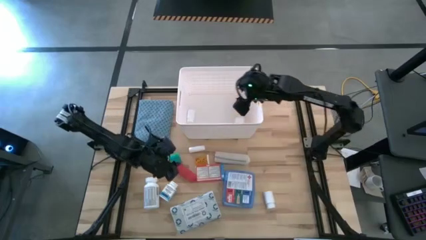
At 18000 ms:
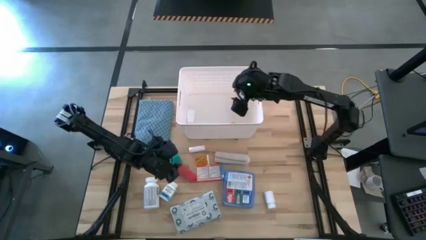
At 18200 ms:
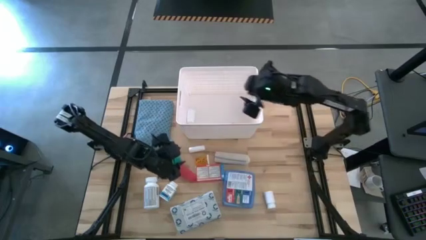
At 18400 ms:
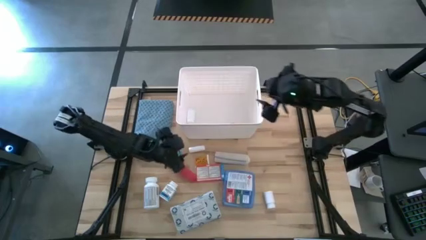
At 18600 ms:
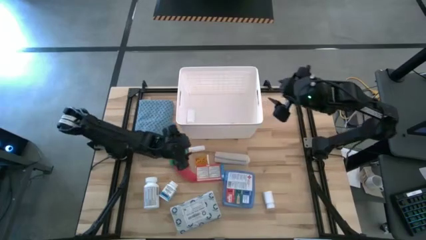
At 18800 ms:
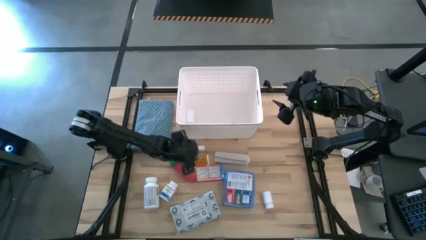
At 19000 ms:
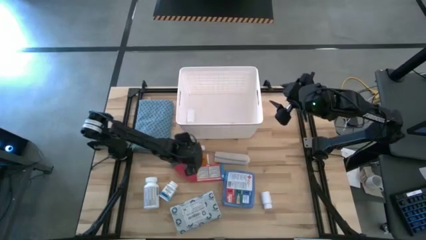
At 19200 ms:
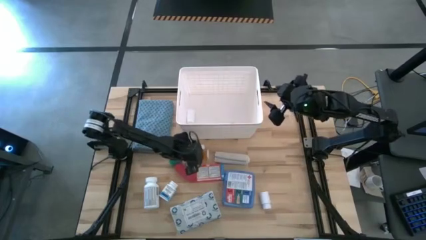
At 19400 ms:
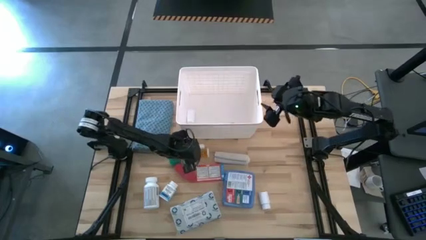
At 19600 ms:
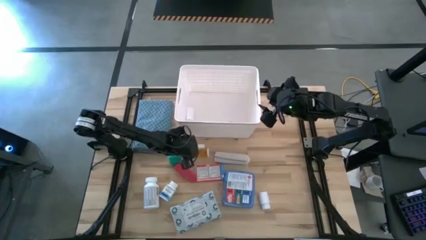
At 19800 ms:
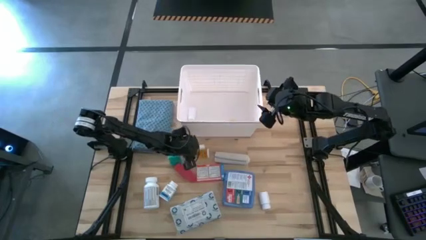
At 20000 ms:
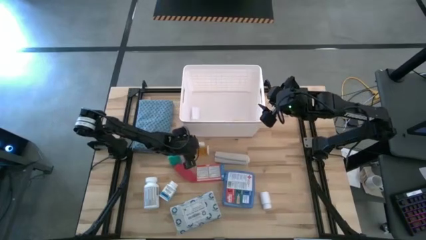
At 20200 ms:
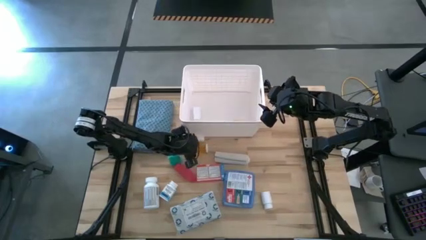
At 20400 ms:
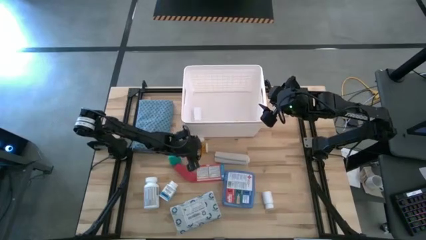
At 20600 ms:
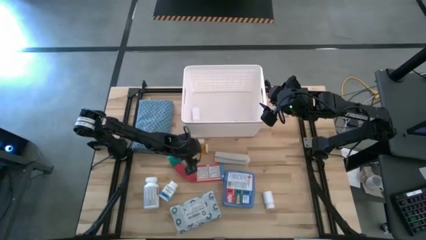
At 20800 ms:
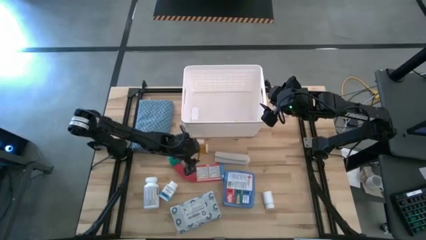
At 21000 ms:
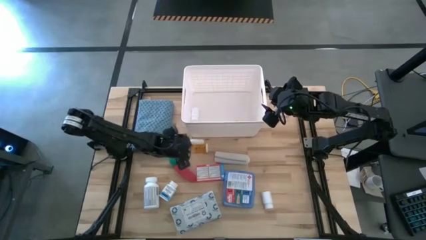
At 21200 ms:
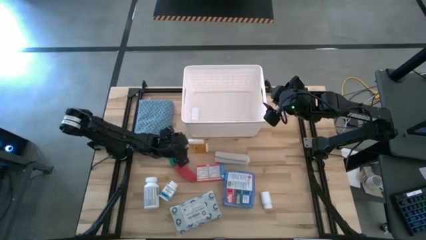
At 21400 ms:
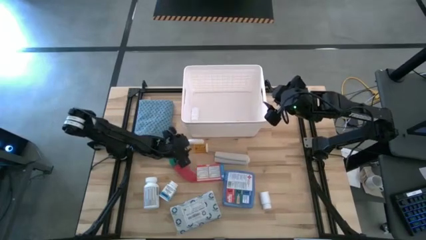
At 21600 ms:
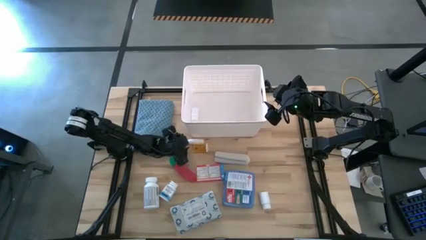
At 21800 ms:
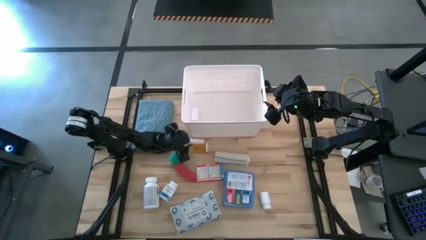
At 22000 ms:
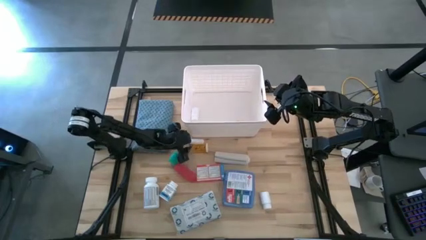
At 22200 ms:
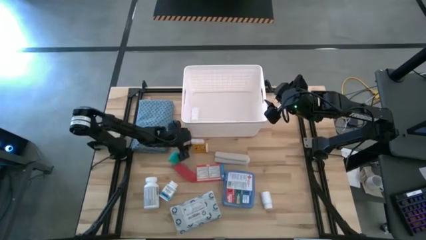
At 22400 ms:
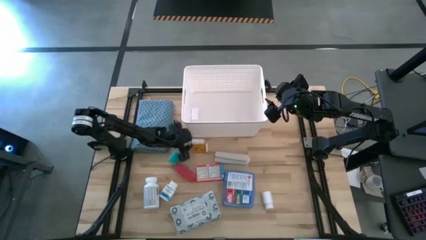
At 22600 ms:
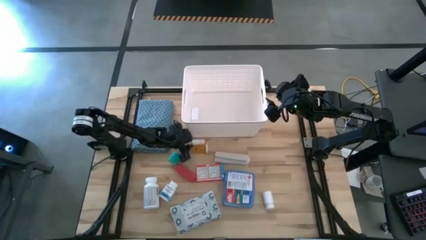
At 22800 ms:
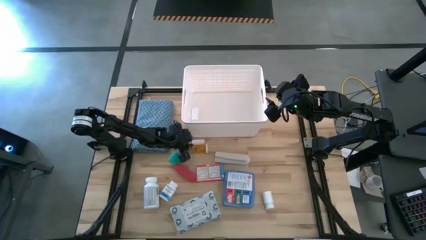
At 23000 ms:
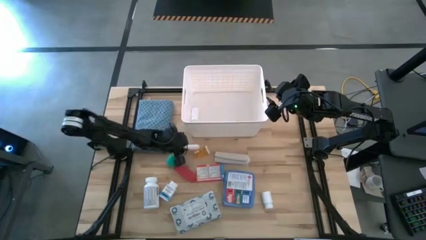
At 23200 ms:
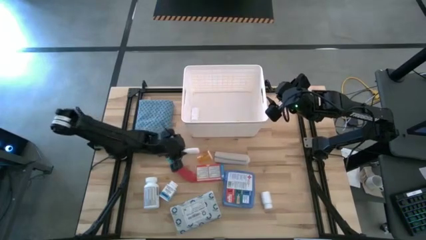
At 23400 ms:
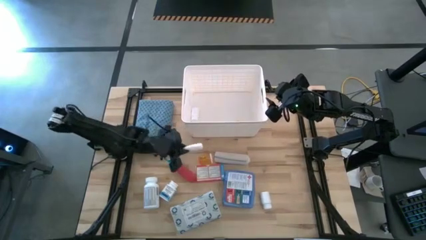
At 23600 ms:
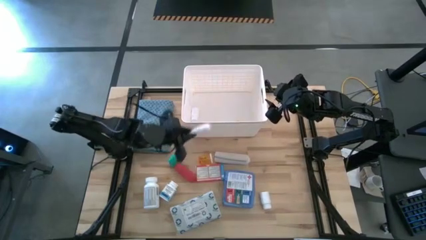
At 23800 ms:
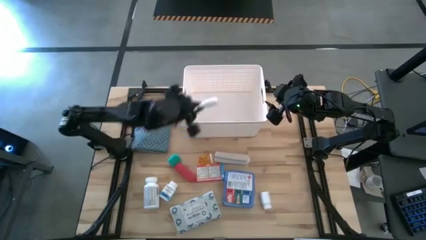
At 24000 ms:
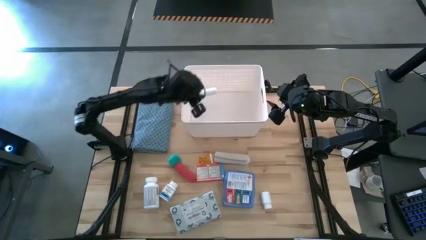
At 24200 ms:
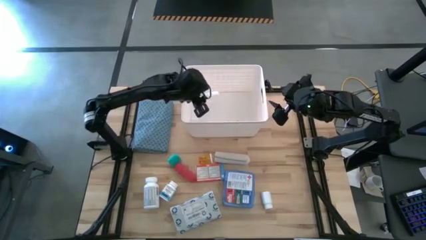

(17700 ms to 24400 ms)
Task: Pick & place medical supplies in basket/bin
Put the white rolled gauze into the white bin

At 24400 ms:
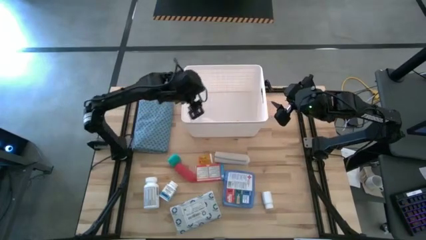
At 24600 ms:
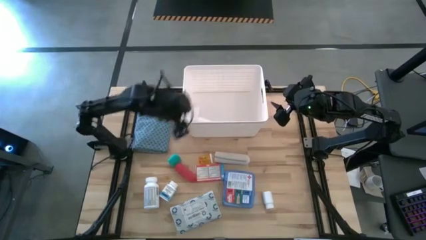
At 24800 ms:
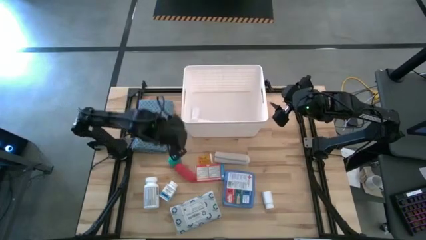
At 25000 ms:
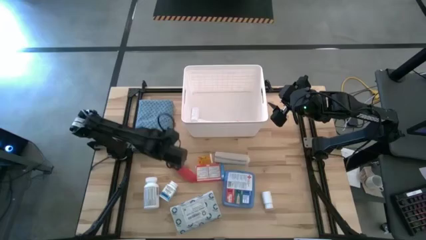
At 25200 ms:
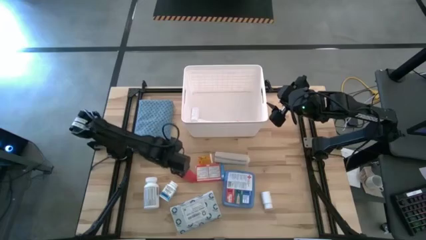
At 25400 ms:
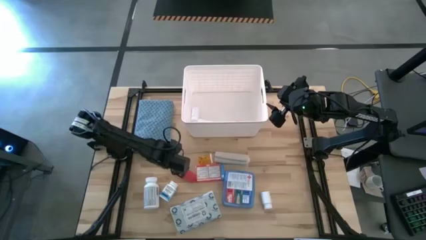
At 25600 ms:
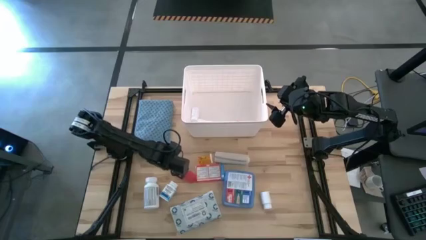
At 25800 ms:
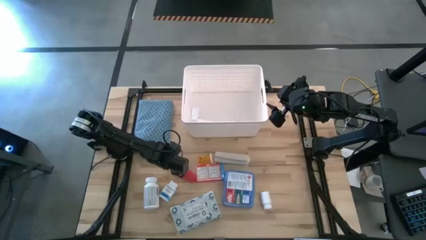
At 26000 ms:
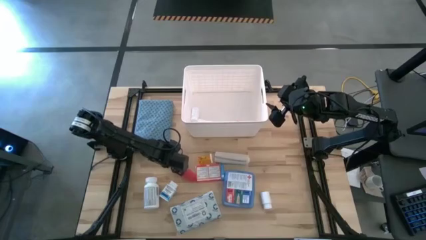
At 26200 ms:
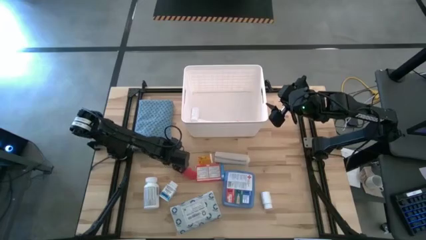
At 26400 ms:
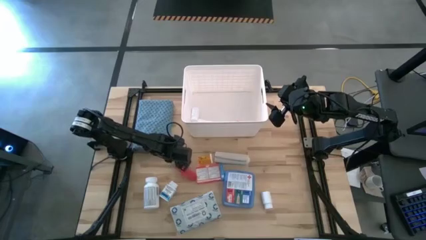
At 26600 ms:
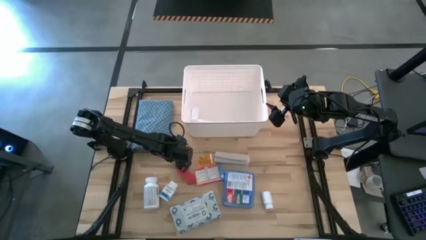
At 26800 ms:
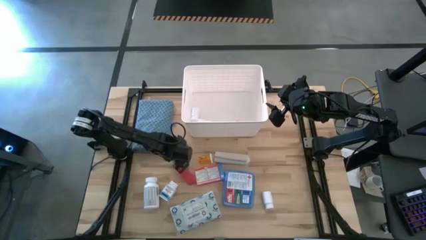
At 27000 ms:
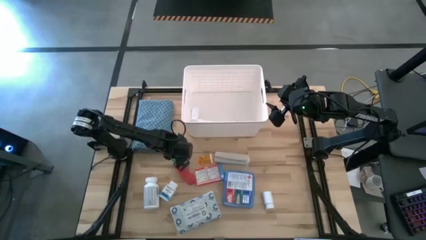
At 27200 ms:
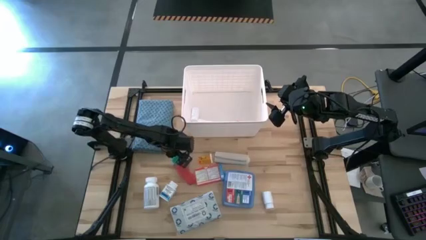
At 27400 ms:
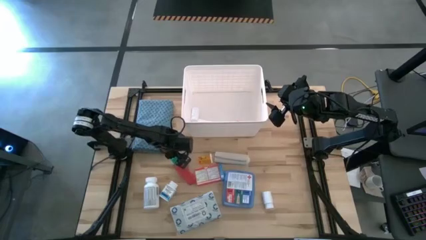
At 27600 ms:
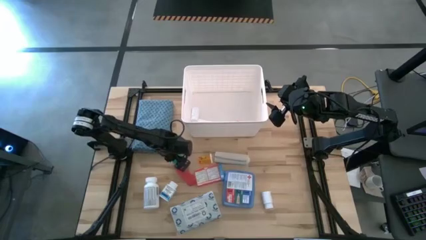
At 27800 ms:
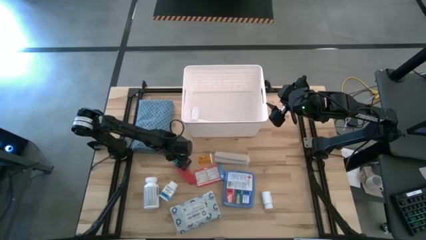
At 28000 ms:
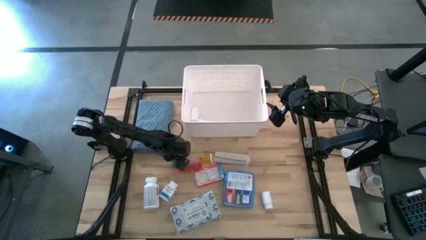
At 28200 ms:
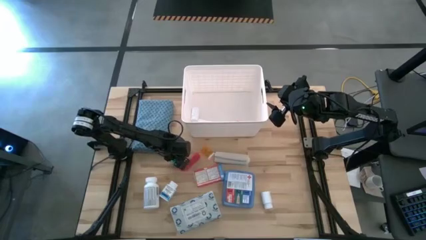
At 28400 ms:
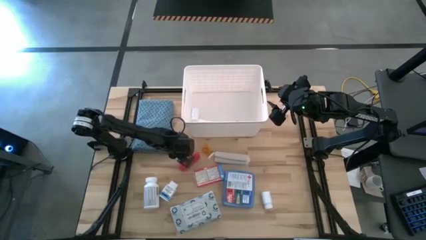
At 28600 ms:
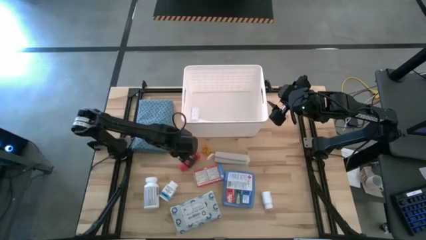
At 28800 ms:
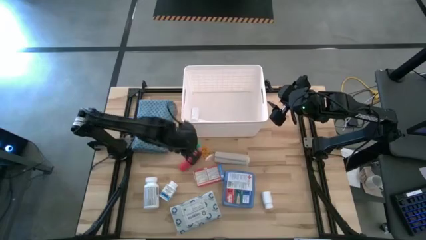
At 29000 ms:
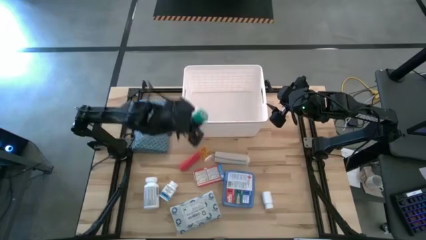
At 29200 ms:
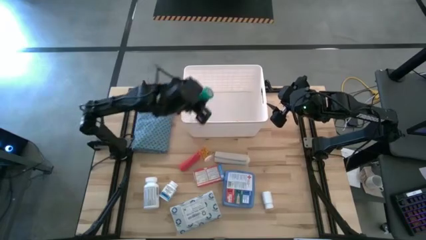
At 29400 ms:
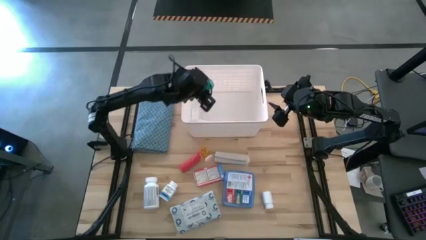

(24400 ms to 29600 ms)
Put the blue bandage into the white bin

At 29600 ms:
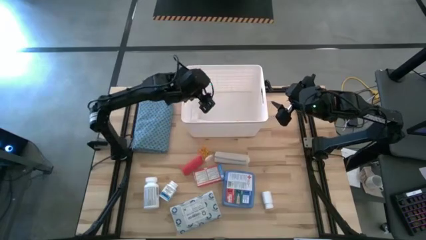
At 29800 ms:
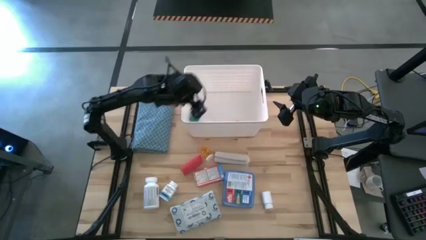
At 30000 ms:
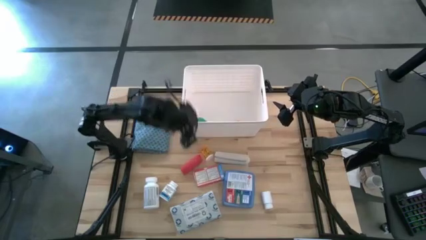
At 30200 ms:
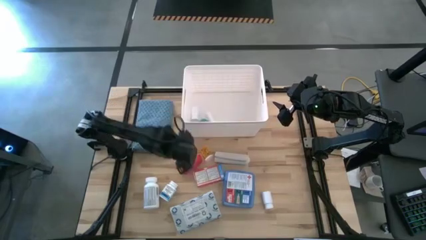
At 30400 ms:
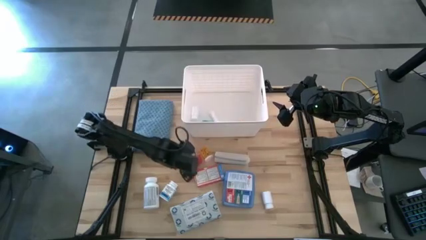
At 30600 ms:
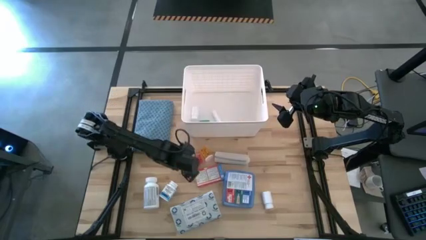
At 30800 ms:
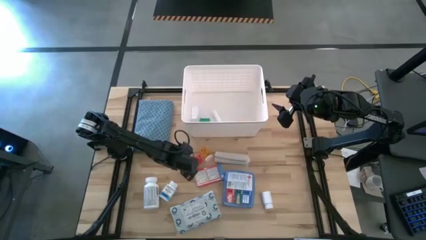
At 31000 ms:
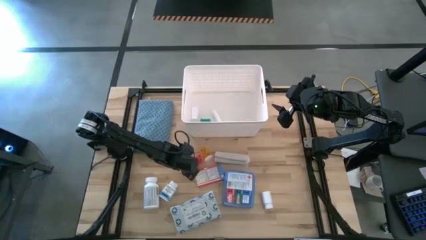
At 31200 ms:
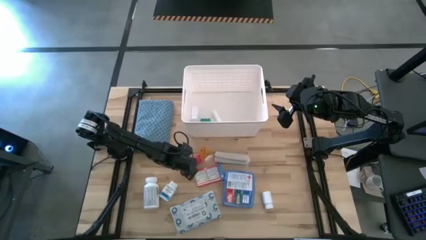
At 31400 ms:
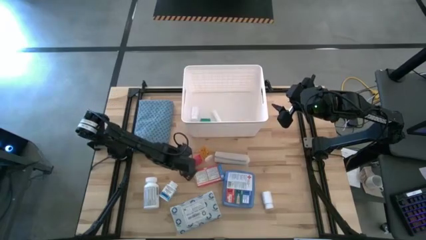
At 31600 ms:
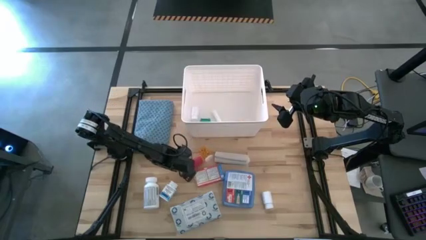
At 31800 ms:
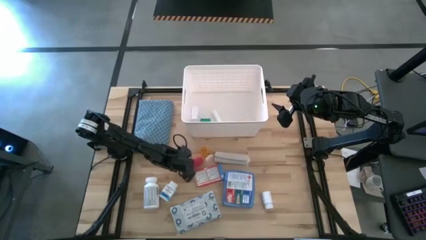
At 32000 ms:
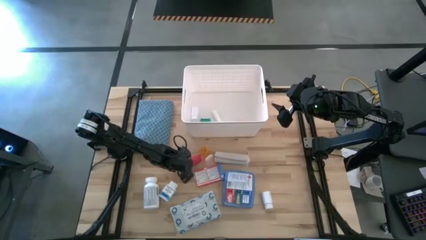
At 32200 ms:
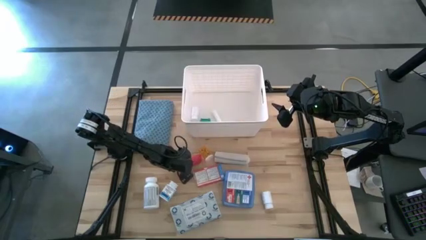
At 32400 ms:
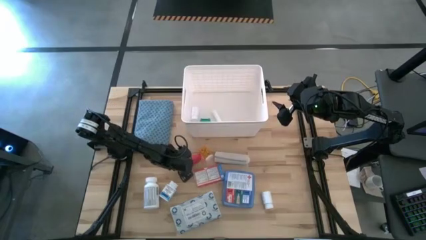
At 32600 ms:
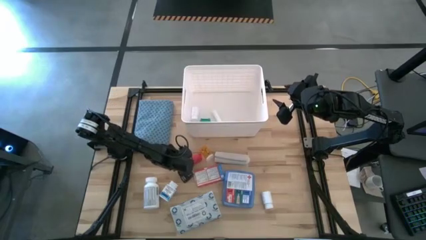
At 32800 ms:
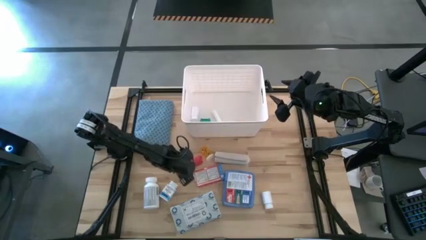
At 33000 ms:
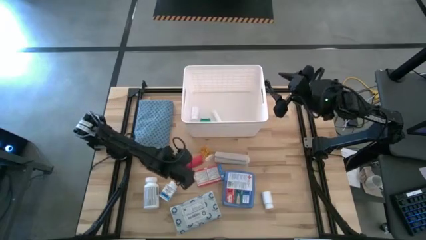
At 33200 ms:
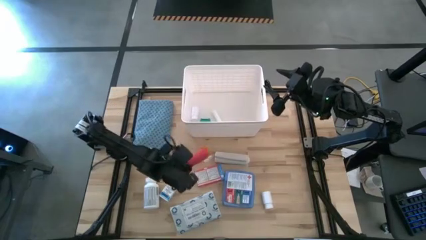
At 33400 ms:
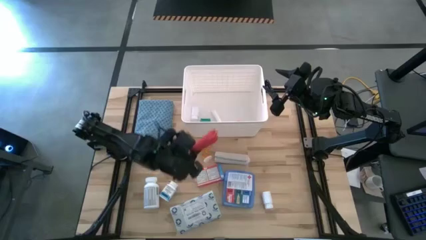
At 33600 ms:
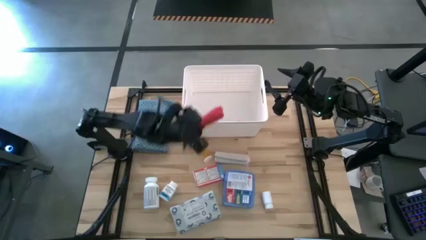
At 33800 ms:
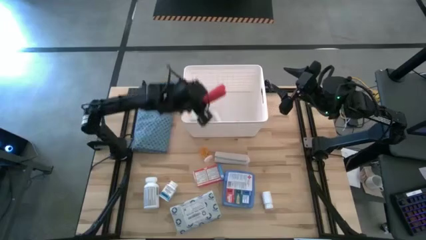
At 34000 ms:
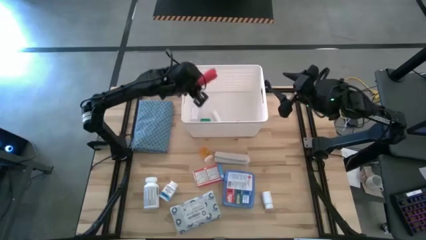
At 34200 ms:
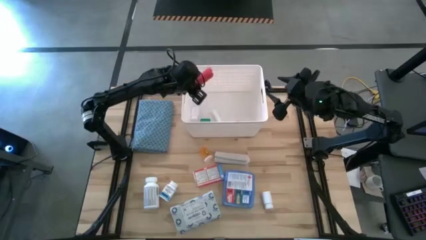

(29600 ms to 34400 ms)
Put the red bandage into the white bin
